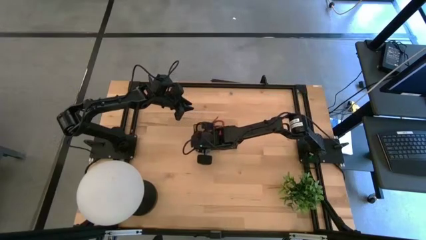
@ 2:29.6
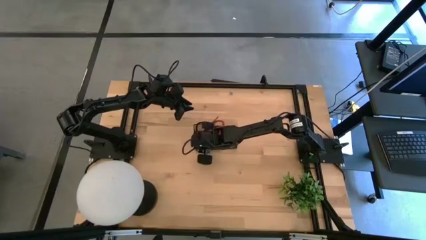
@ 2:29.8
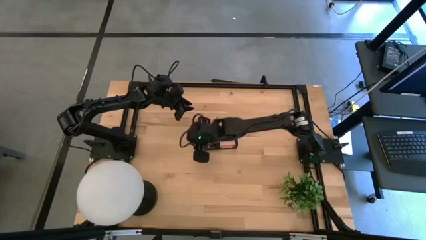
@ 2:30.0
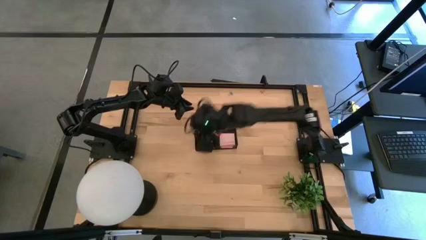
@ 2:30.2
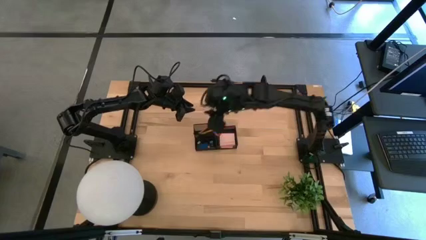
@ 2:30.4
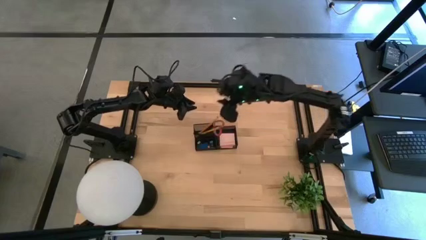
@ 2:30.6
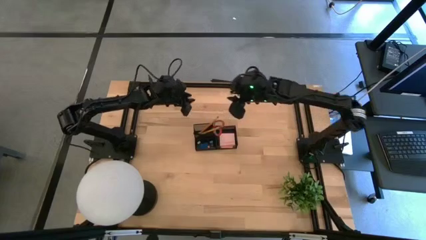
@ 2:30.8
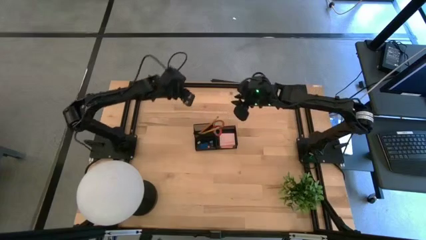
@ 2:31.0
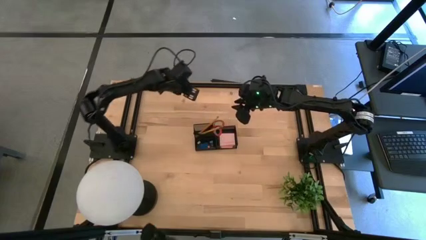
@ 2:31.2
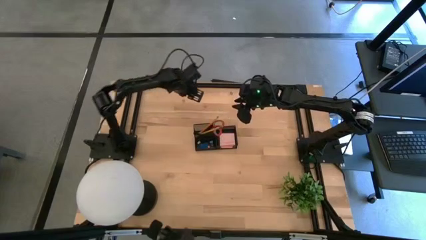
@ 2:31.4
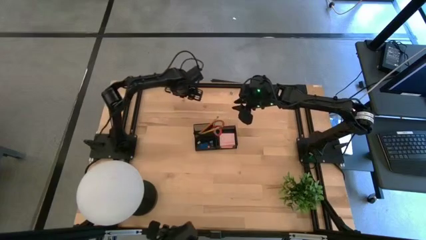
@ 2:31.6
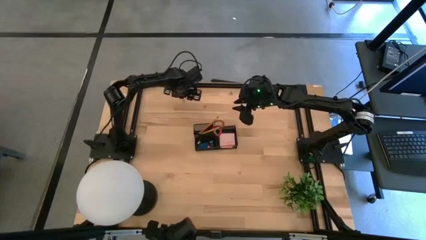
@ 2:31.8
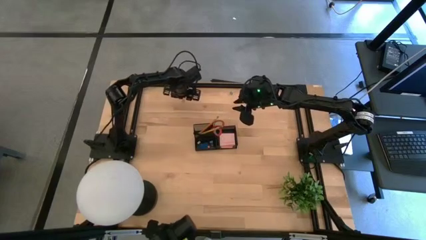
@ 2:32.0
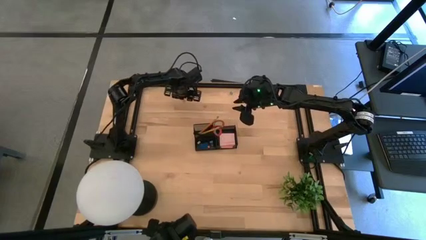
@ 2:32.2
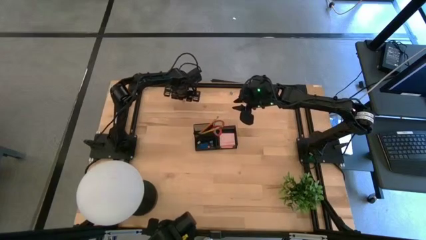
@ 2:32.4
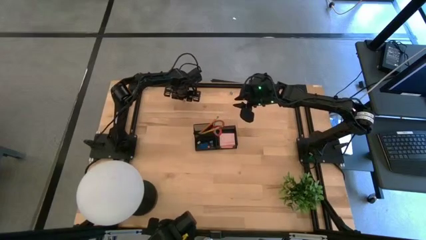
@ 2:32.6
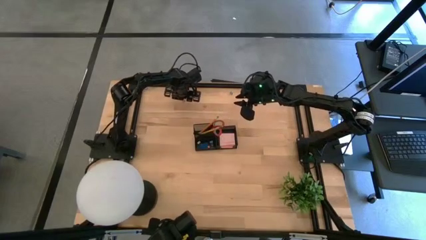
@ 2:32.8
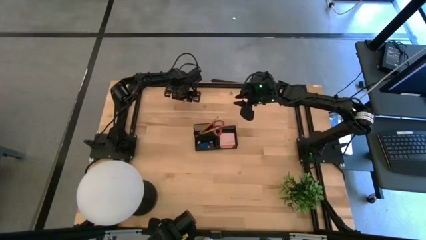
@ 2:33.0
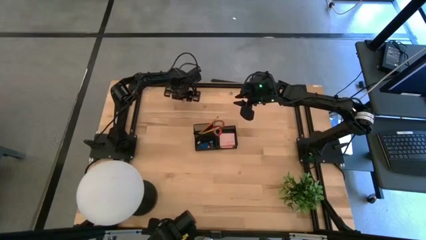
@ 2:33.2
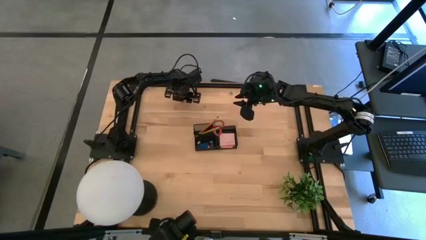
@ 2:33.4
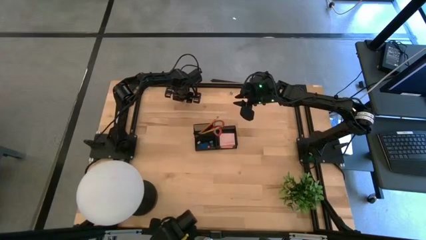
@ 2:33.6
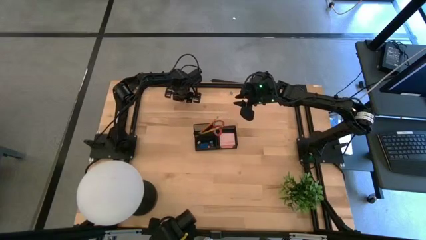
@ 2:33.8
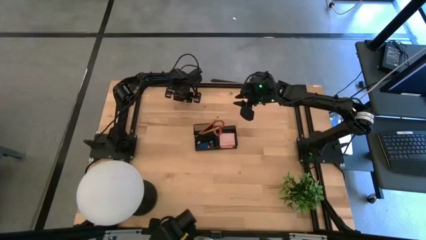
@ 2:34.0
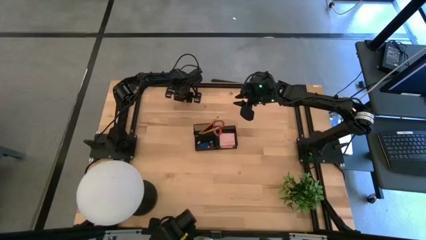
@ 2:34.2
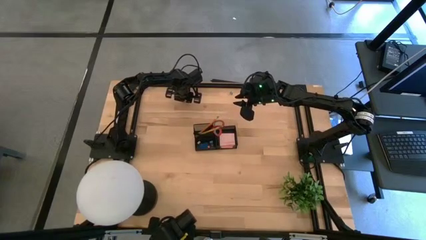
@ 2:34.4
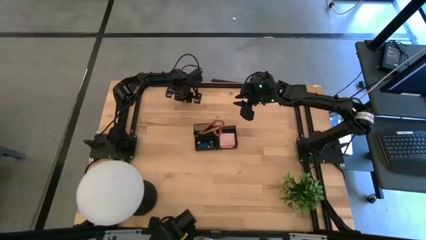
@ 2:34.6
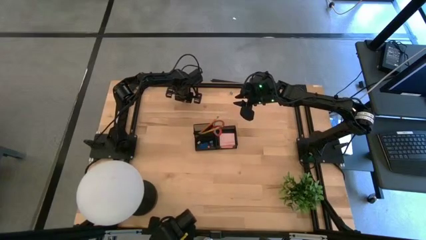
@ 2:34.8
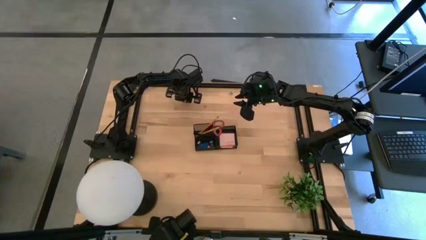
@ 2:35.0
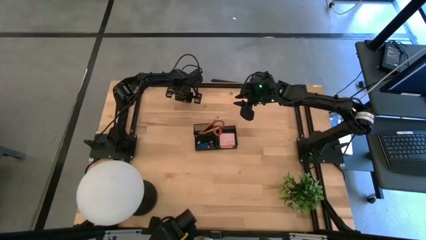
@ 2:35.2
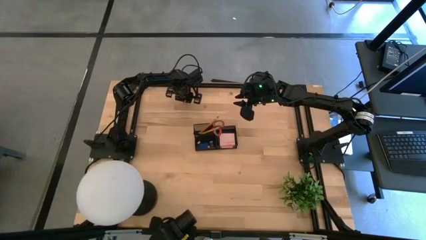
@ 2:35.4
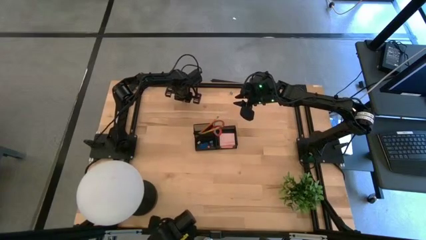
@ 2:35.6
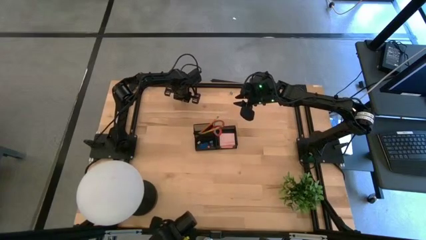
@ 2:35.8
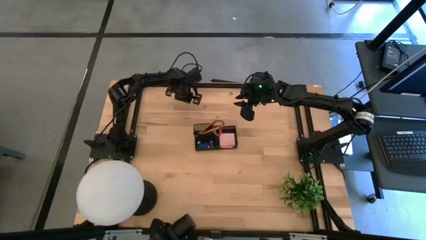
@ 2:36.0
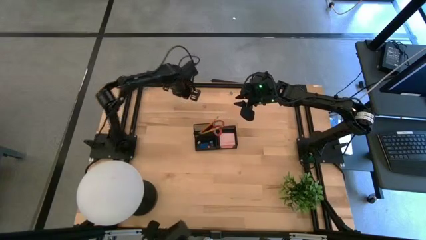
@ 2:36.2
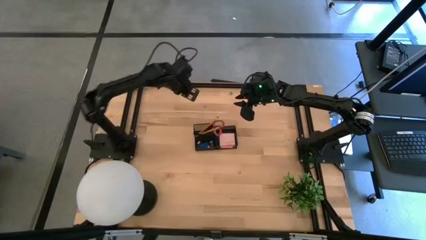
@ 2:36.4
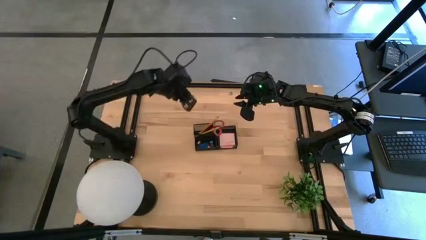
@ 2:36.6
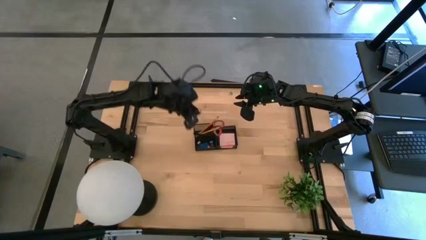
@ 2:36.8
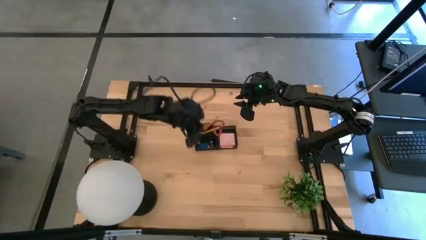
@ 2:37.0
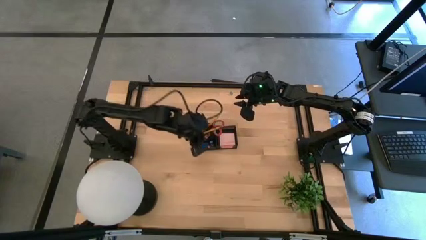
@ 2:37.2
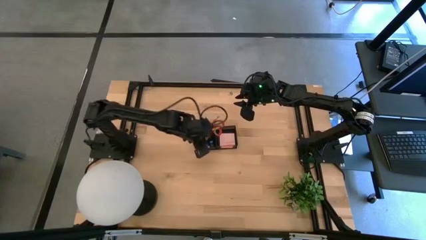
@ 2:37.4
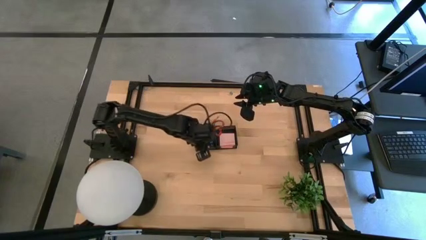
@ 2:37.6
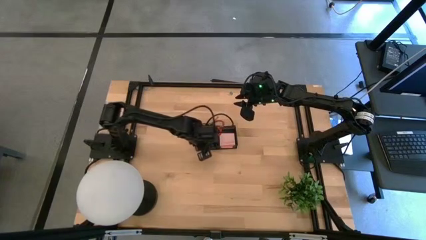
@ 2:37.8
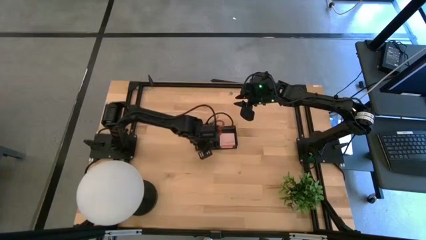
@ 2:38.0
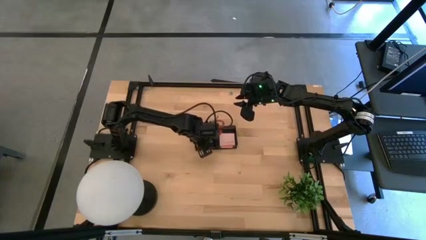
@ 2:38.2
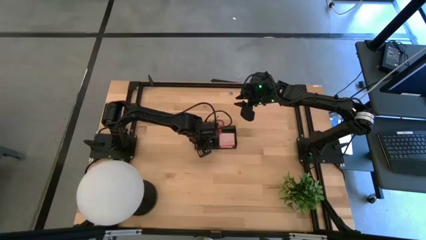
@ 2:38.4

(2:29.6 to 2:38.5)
Task: Pick and place office supplies into organizer
Put the pink binder clip into the desk organizer

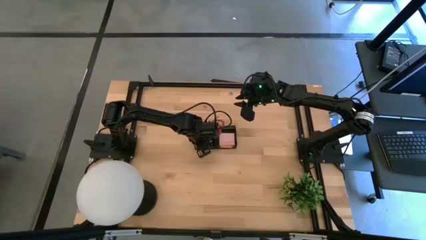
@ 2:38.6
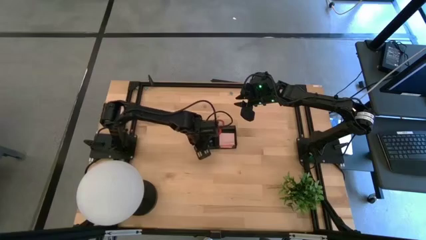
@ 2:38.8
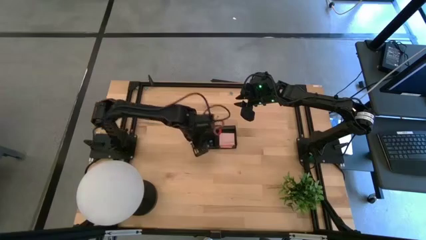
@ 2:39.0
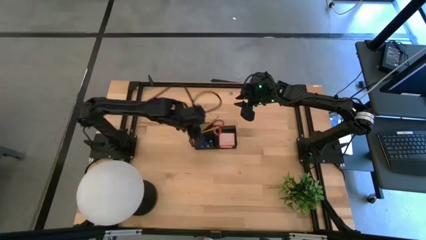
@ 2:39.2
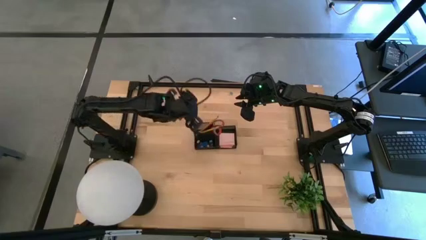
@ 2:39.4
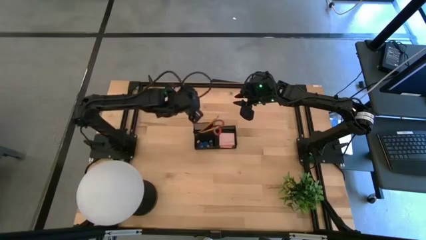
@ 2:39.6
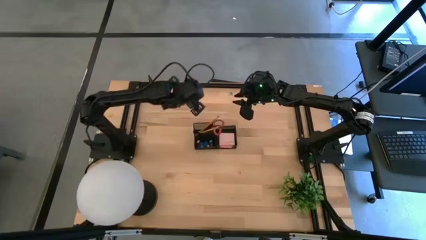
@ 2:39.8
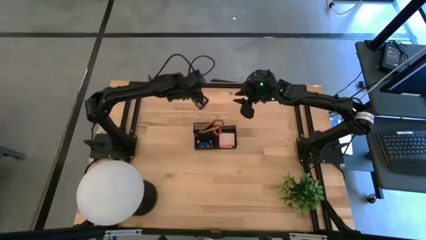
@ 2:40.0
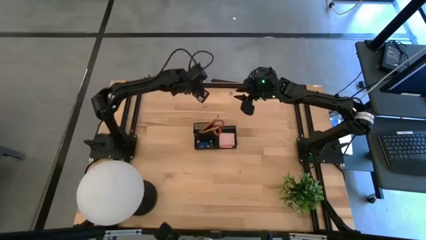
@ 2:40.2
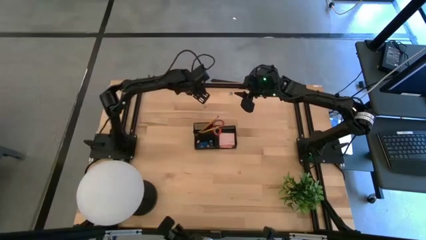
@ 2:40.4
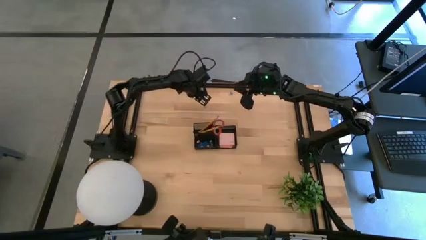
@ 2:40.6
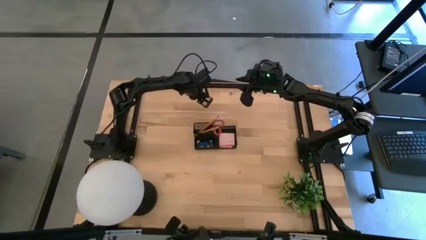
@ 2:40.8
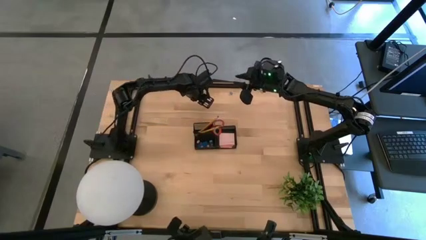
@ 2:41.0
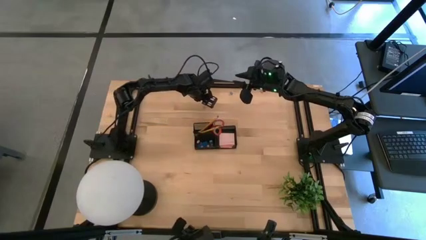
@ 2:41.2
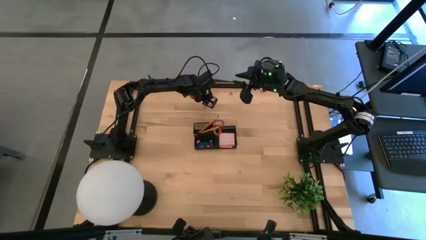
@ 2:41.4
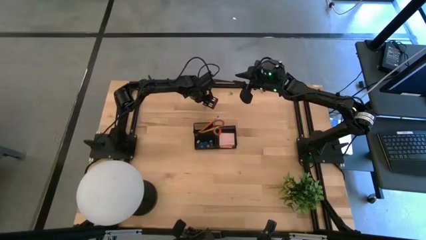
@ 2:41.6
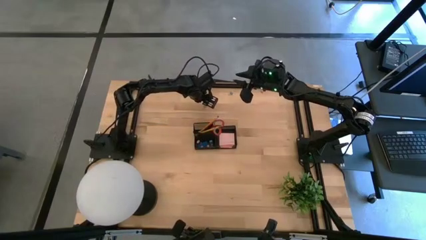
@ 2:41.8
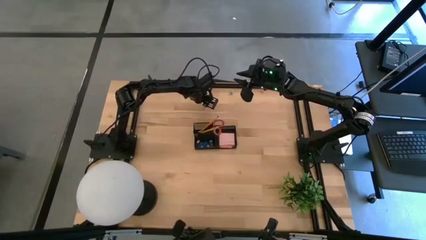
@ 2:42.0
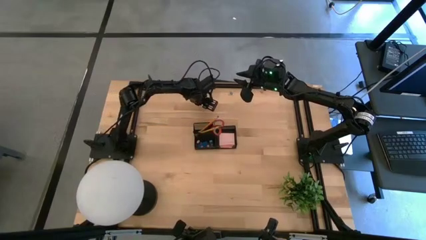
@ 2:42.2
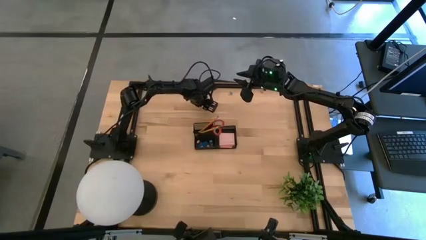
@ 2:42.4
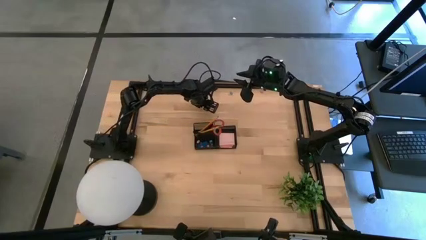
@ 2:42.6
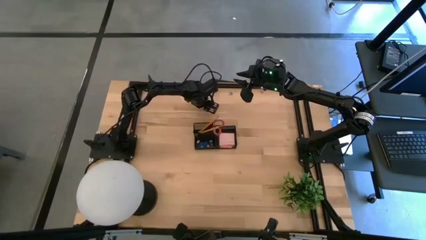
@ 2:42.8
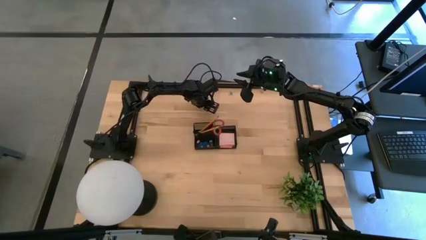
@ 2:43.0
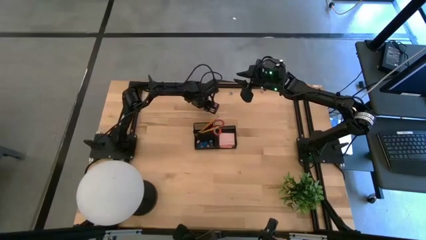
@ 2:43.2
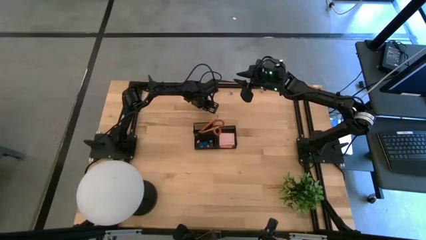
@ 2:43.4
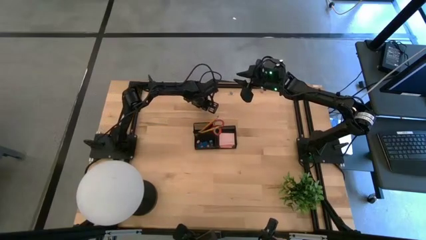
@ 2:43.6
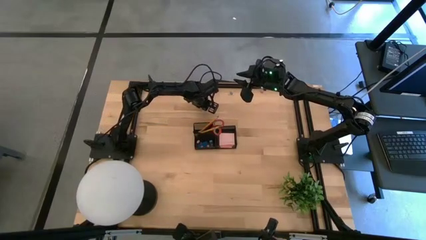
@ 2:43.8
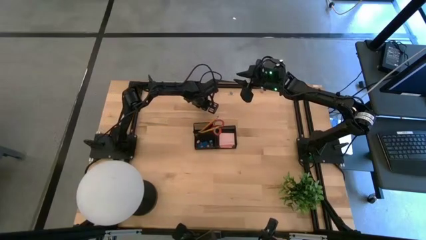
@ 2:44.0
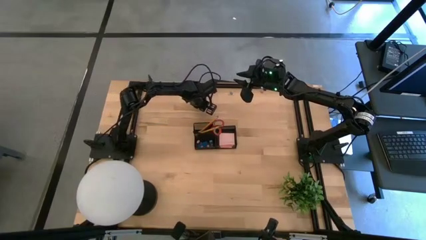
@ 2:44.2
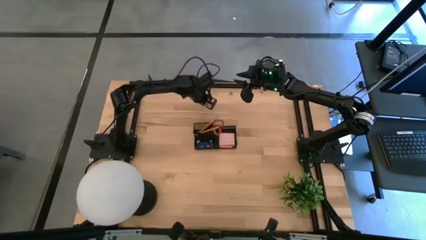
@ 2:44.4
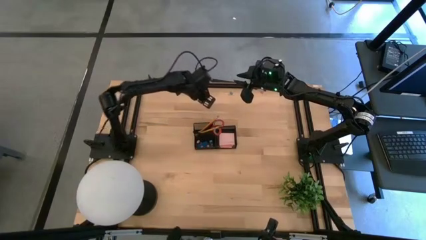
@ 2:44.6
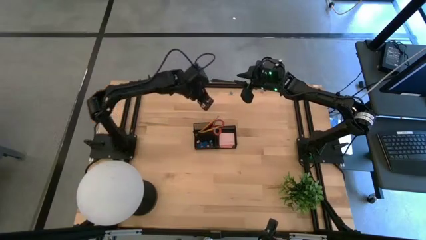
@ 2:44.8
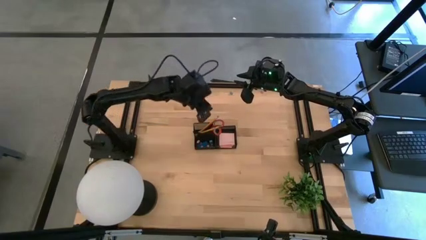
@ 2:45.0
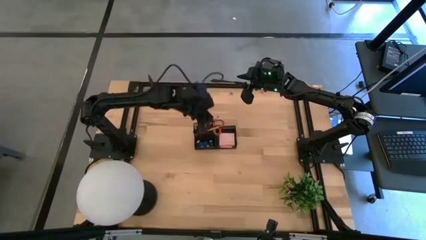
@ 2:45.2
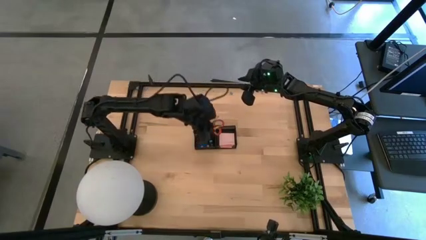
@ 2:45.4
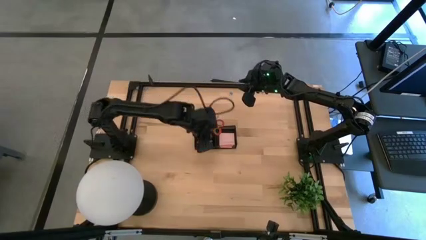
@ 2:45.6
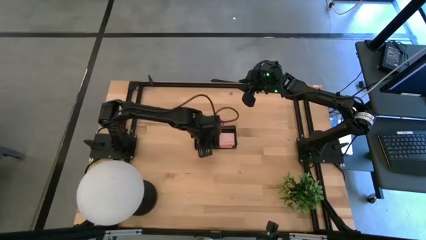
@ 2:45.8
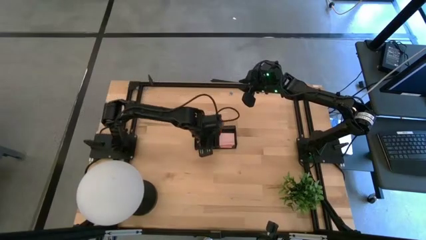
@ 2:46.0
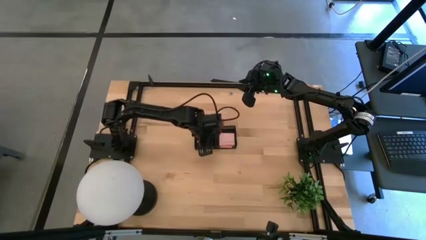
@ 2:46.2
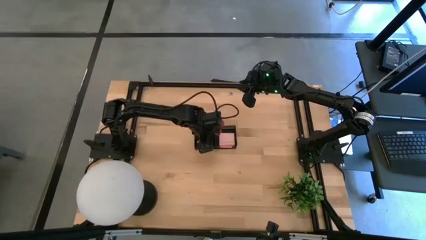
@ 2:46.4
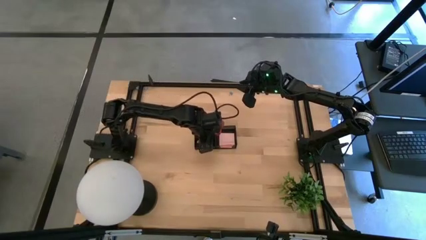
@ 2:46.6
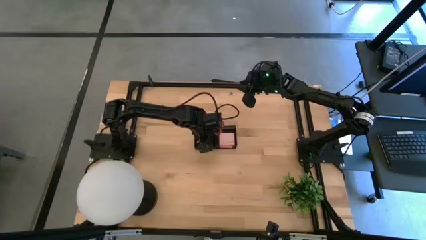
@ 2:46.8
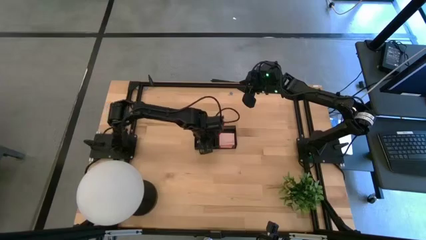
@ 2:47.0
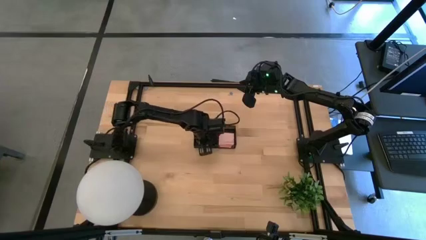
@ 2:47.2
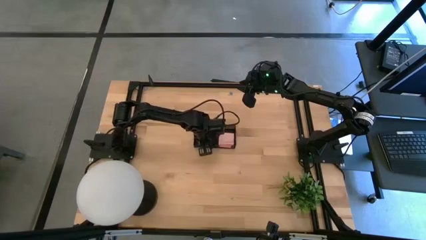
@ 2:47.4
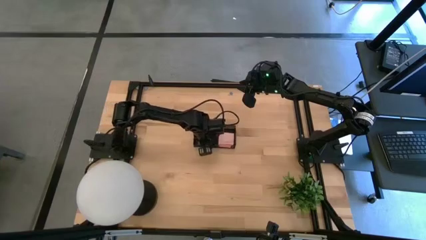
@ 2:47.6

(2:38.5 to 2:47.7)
Put the pink binder clip into the desk organizer
